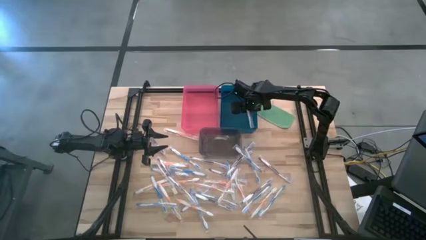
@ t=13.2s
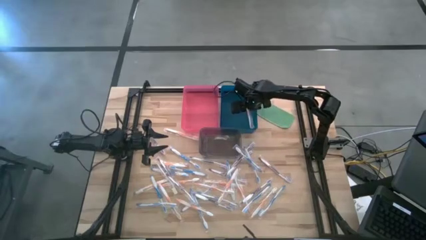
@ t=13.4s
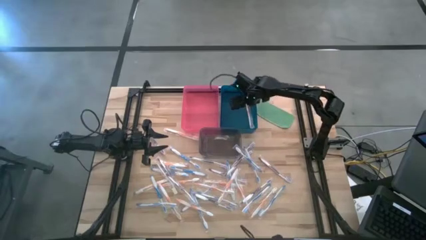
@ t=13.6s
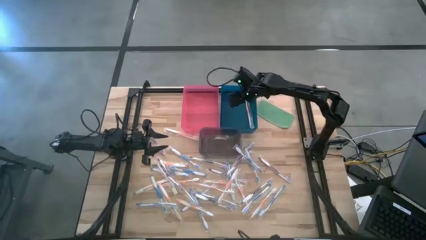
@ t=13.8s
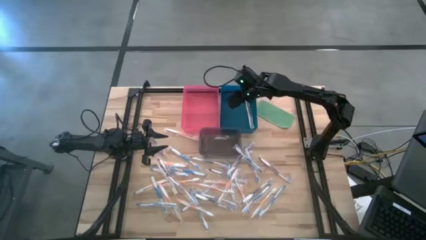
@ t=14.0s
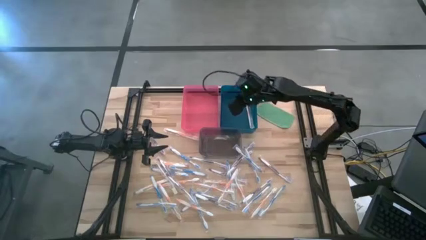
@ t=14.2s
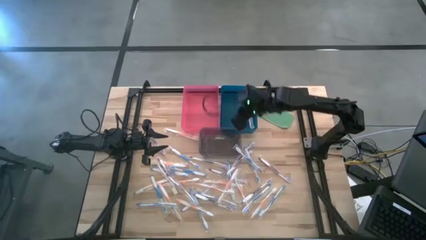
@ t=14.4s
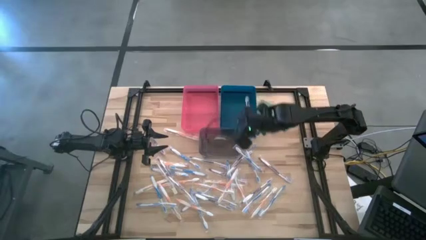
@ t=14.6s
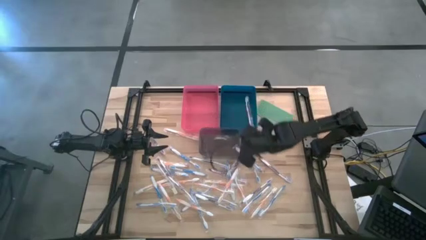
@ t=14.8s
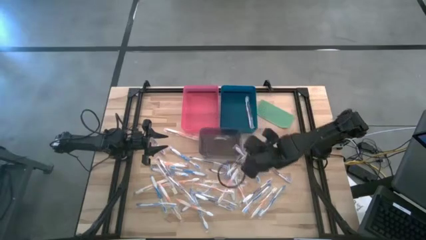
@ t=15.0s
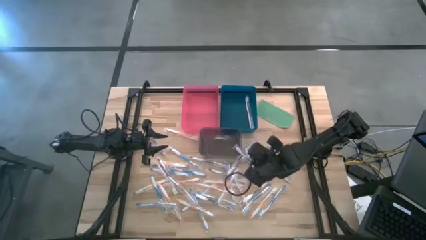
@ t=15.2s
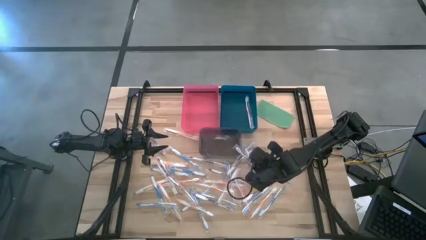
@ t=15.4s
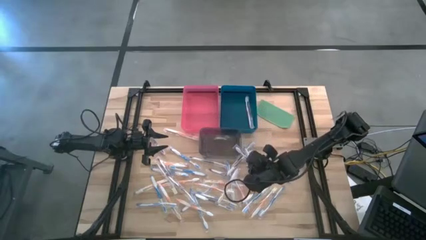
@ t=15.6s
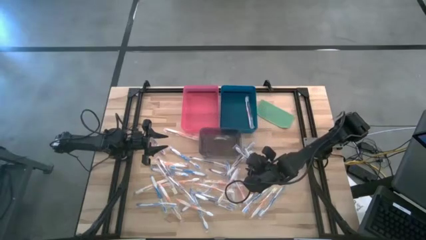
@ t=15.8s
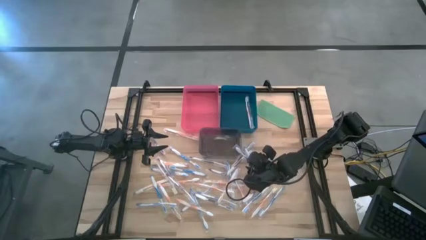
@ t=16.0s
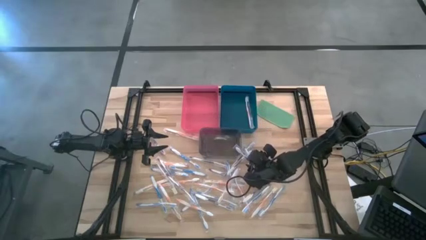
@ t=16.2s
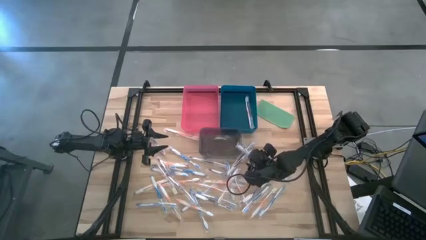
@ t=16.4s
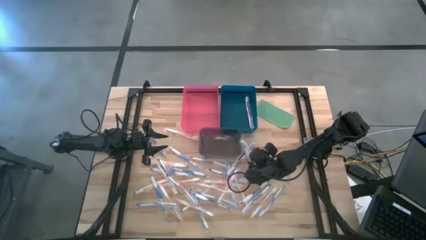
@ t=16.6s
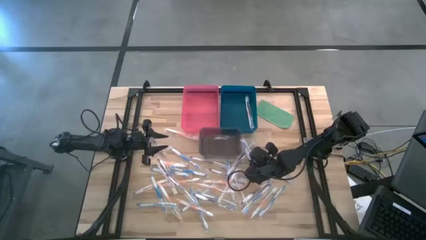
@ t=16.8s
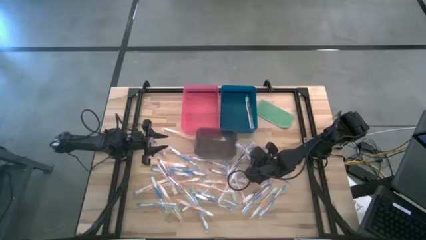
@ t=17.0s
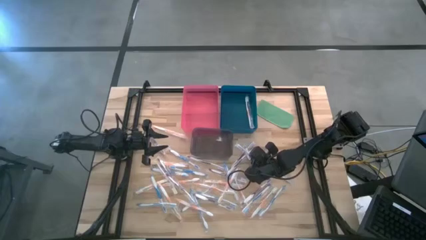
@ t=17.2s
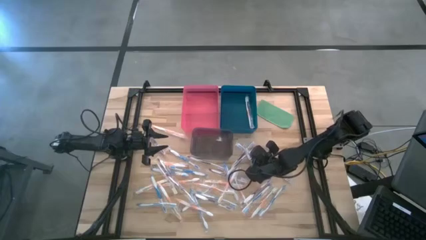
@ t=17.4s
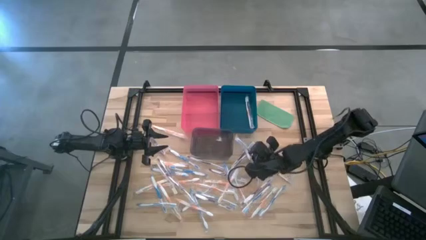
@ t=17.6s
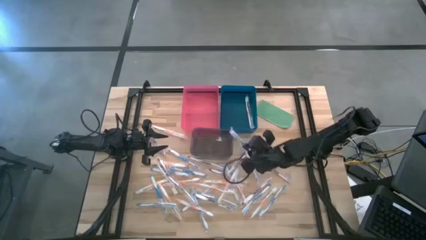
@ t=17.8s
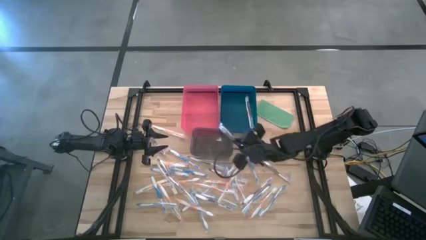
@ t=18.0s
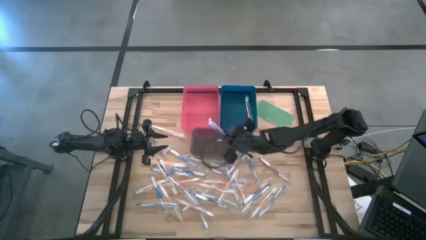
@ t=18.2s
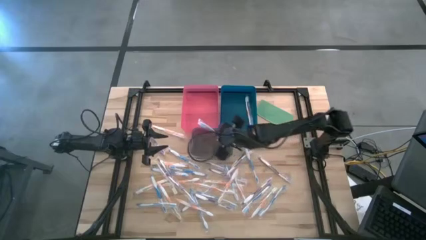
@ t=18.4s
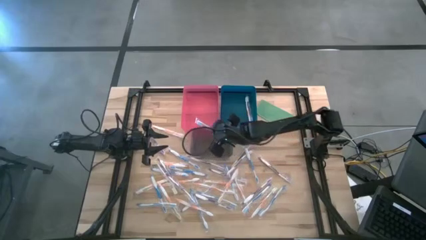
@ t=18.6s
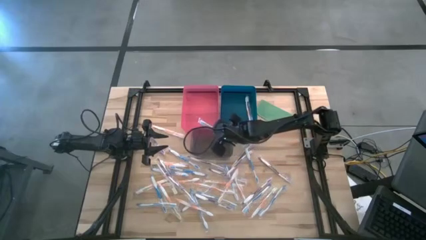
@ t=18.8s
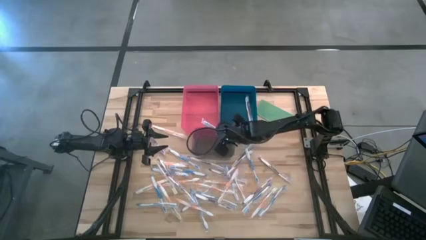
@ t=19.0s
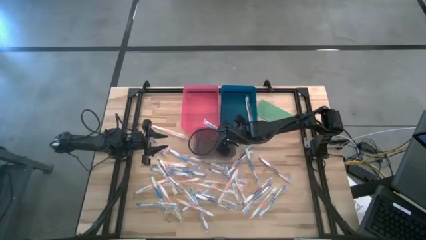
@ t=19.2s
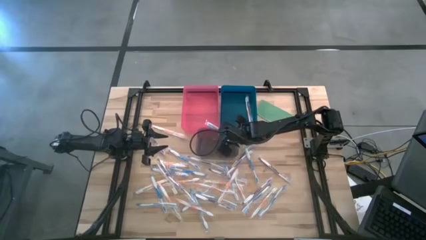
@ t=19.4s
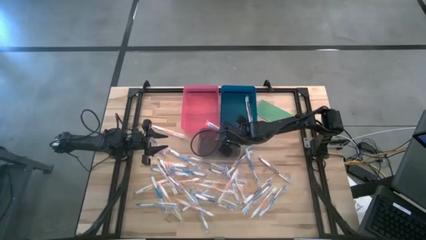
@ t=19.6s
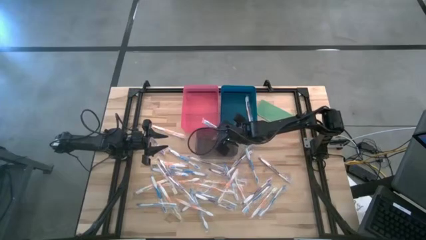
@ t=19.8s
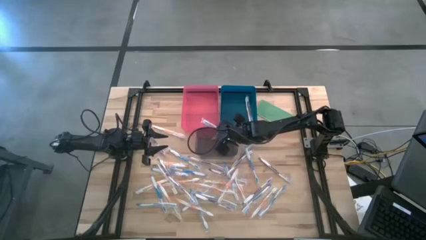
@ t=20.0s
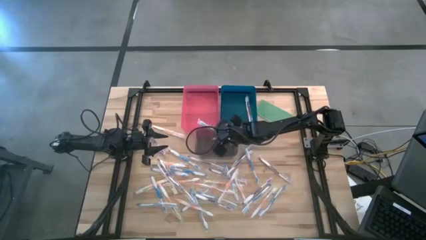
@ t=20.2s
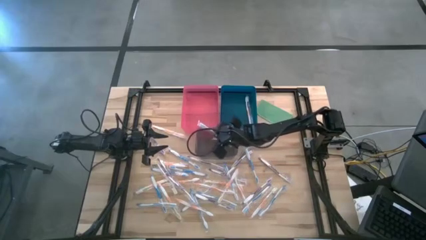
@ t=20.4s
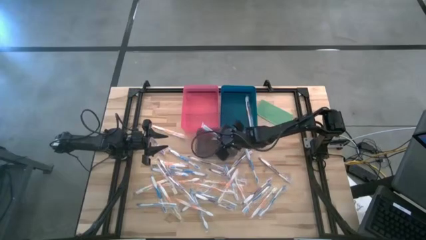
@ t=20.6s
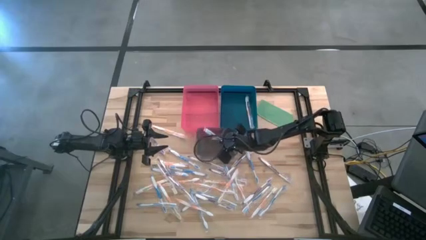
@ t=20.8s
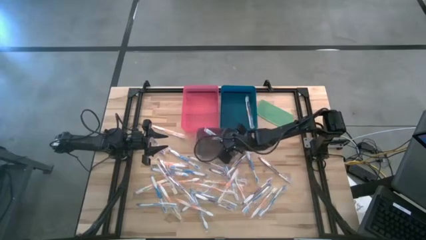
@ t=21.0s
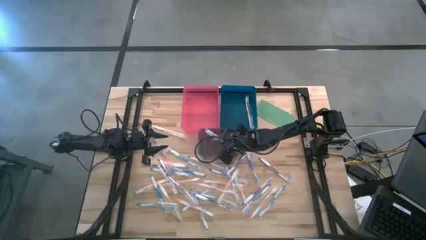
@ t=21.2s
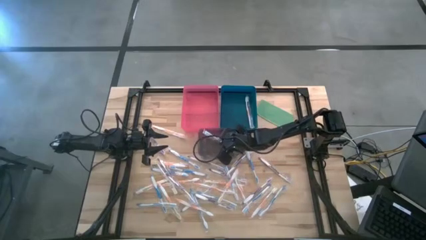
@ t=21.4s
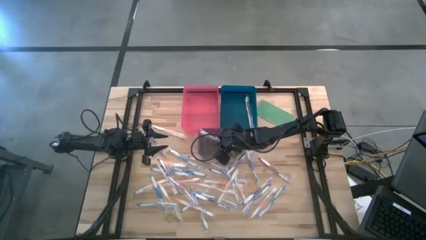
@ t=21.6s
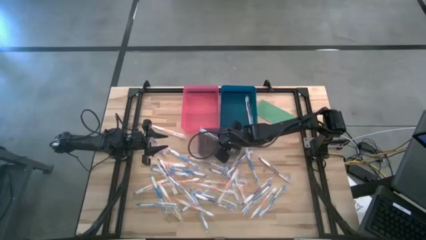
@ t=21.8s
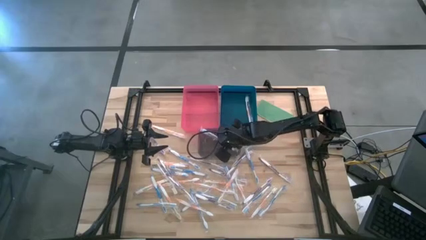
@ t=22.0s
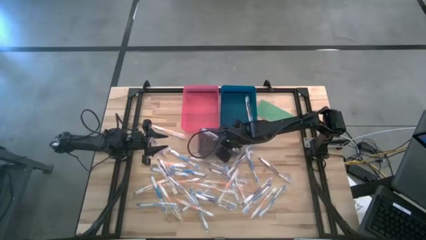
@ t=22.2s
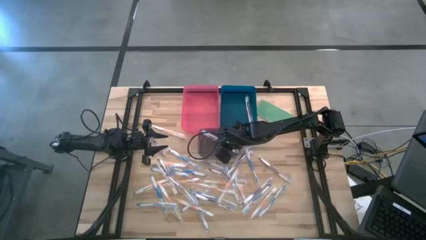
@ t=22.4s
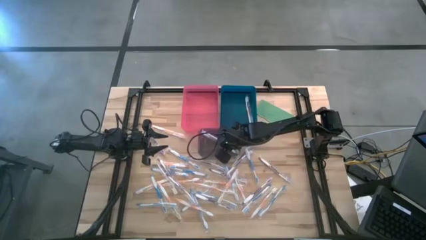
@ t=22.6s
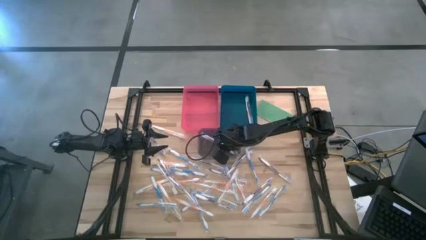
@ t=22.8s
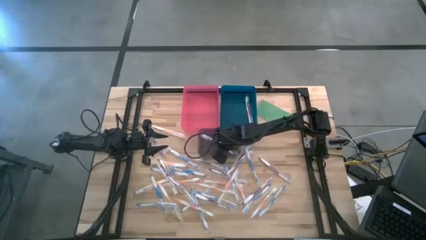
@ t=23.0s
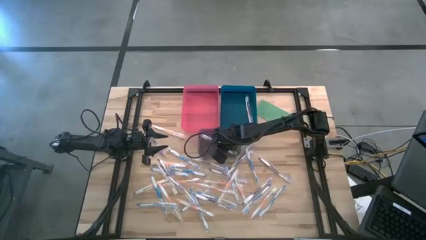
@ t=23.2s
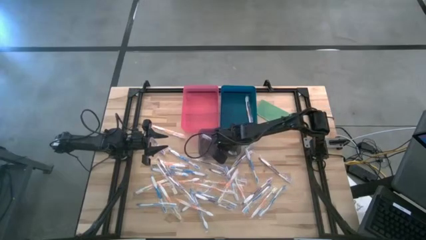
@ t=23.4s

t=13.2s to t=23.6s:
Task: Pick & Place Toothbrushes
Put the blue toothbrush into the transparent gray bin
